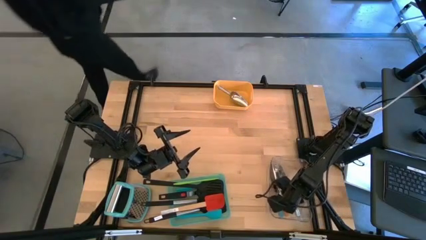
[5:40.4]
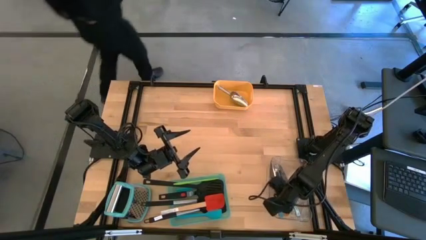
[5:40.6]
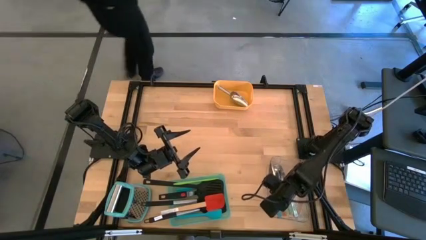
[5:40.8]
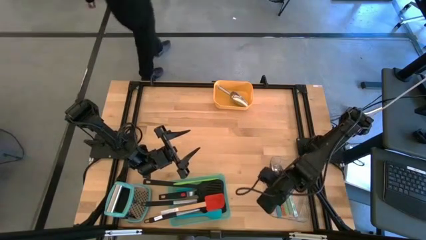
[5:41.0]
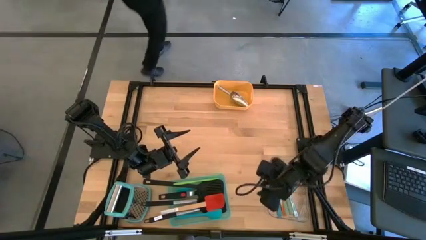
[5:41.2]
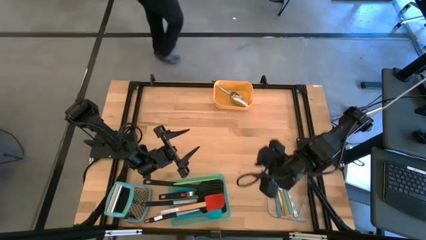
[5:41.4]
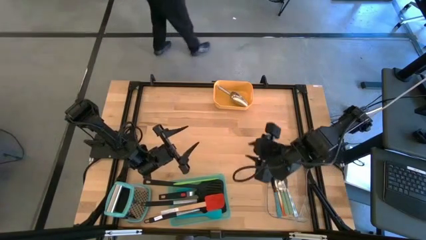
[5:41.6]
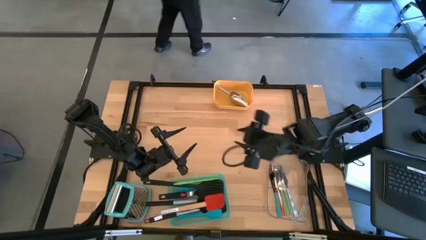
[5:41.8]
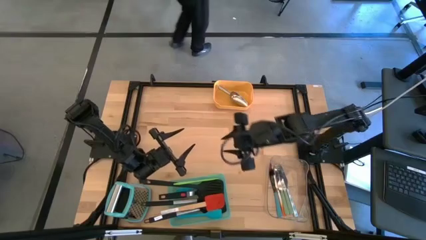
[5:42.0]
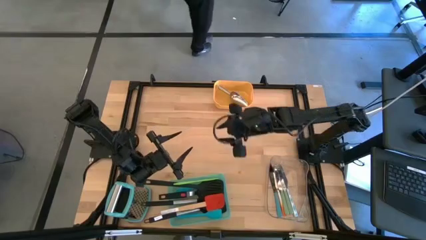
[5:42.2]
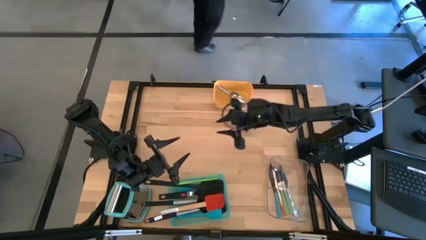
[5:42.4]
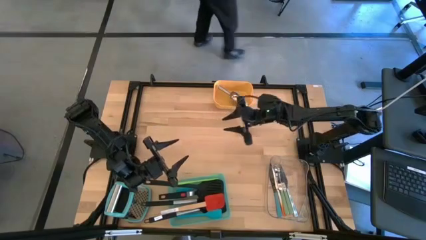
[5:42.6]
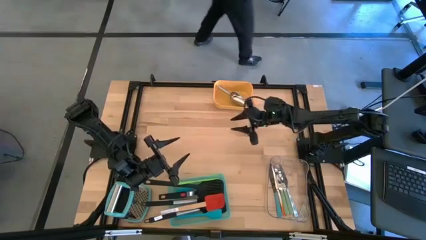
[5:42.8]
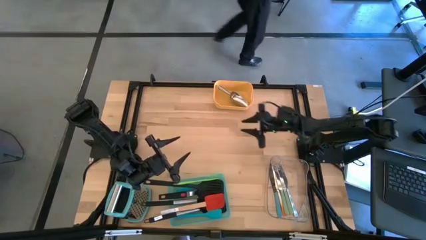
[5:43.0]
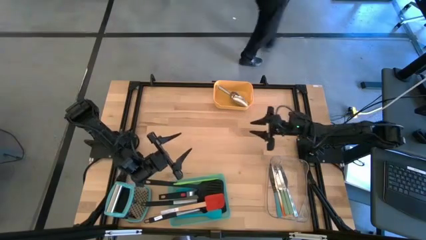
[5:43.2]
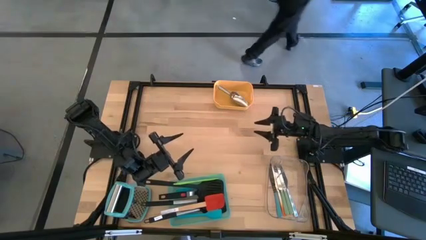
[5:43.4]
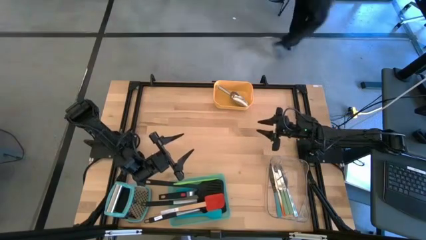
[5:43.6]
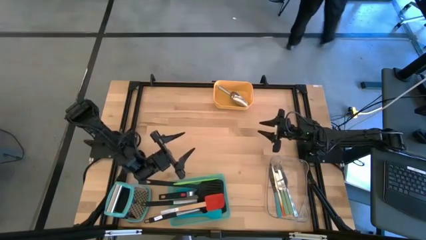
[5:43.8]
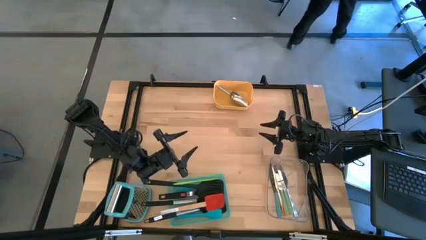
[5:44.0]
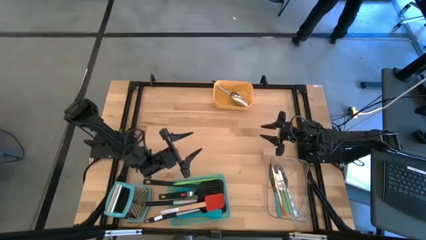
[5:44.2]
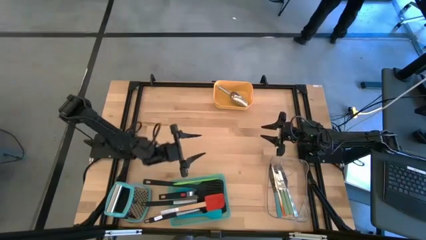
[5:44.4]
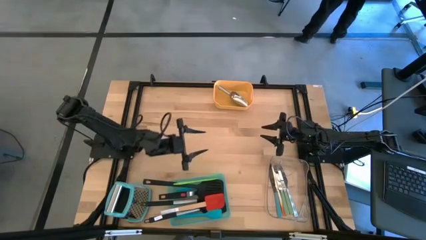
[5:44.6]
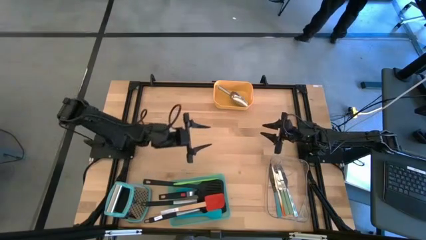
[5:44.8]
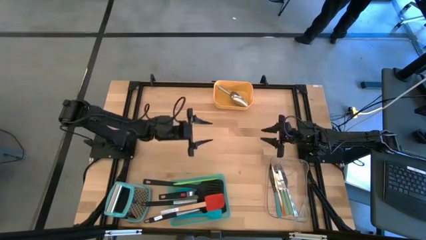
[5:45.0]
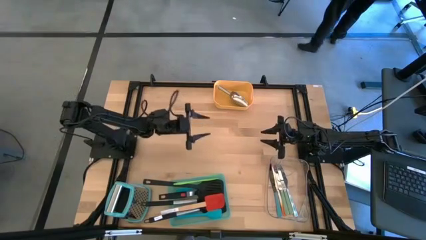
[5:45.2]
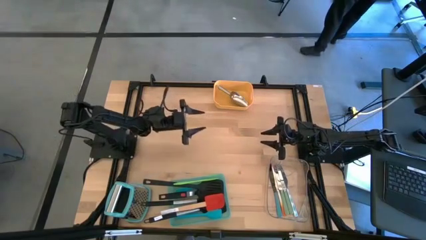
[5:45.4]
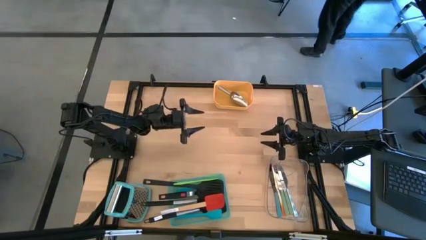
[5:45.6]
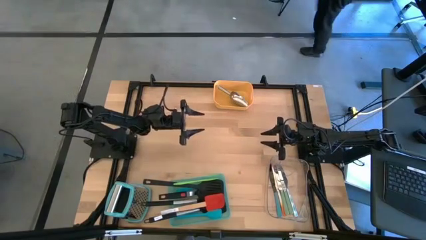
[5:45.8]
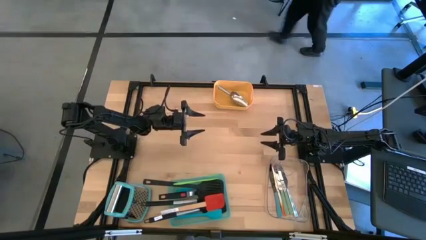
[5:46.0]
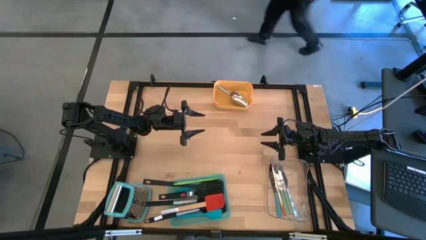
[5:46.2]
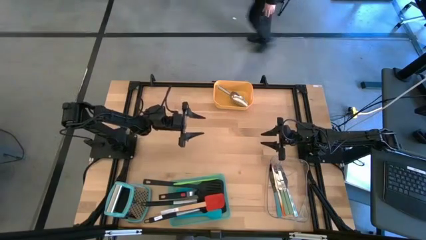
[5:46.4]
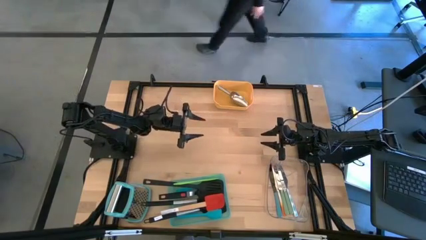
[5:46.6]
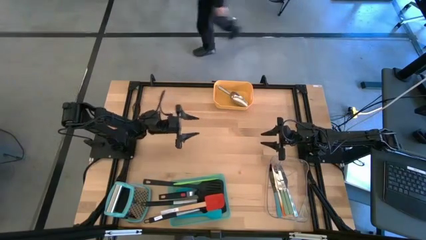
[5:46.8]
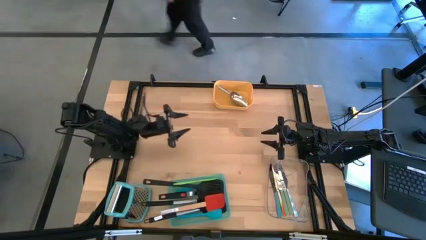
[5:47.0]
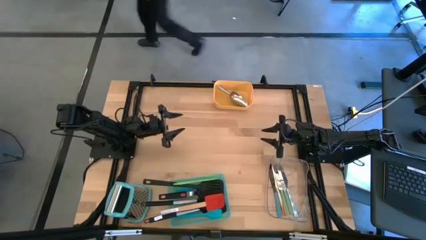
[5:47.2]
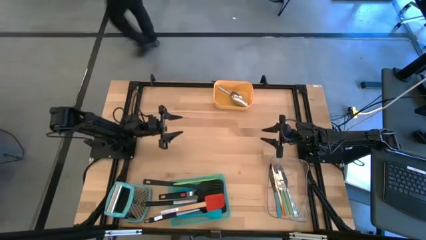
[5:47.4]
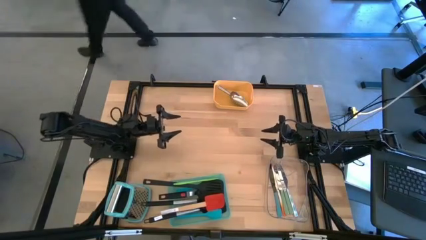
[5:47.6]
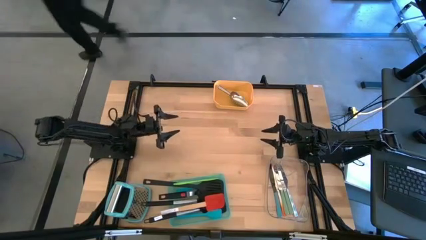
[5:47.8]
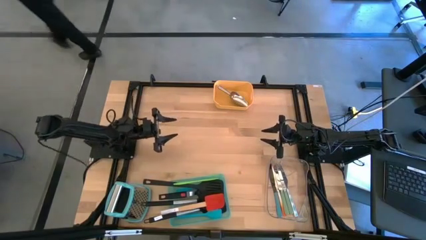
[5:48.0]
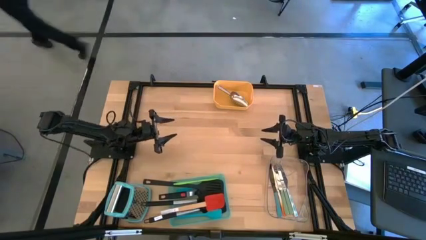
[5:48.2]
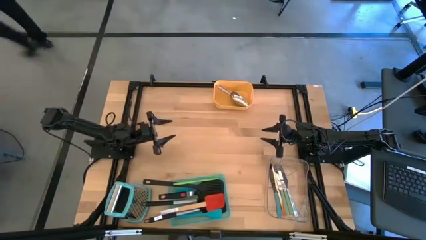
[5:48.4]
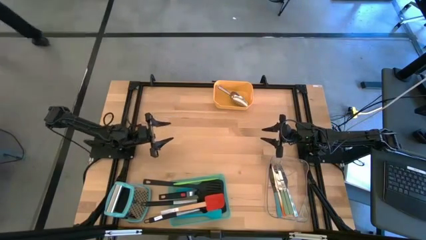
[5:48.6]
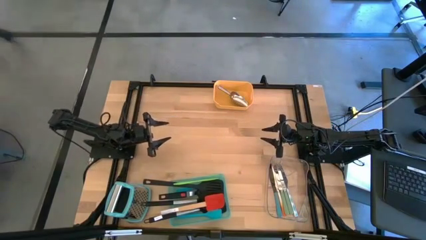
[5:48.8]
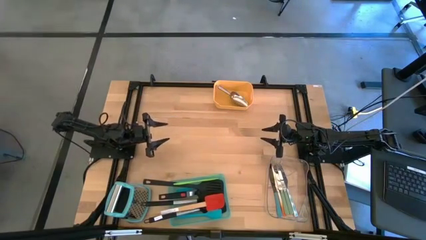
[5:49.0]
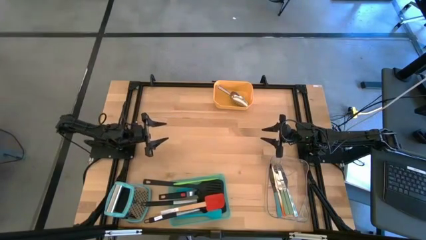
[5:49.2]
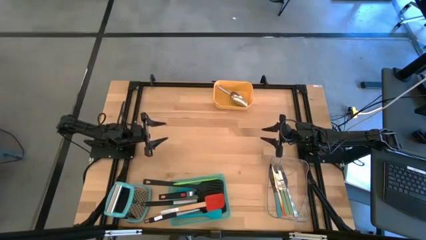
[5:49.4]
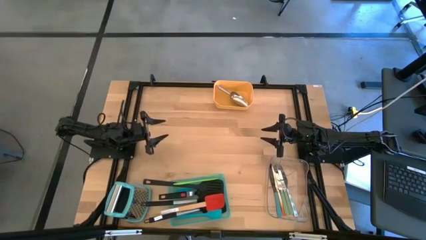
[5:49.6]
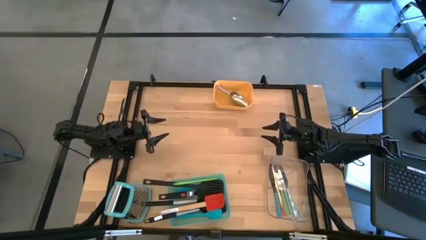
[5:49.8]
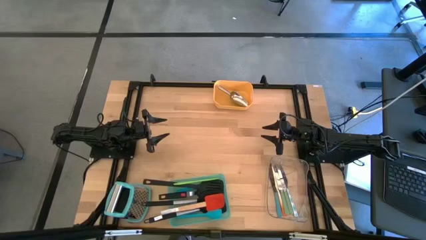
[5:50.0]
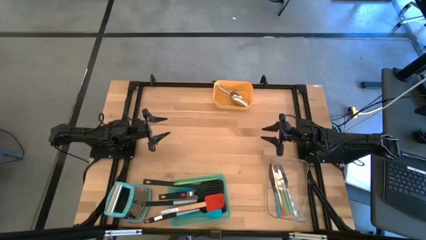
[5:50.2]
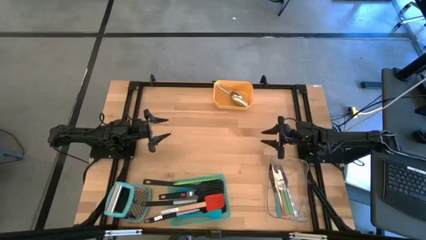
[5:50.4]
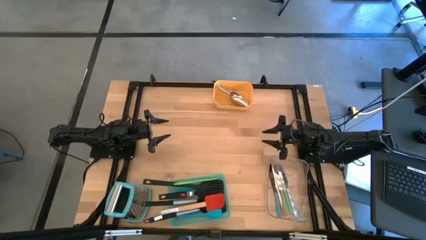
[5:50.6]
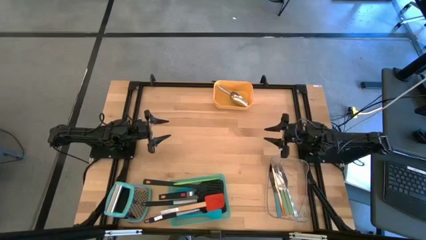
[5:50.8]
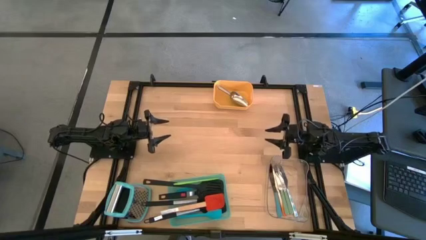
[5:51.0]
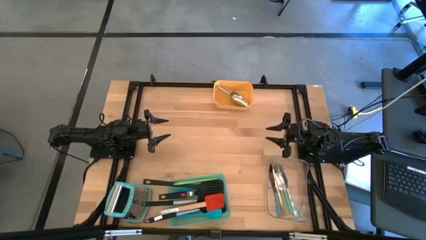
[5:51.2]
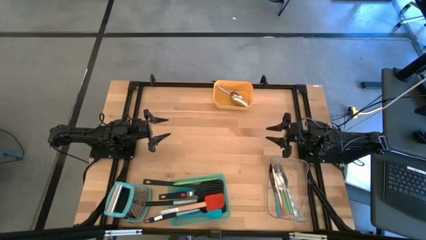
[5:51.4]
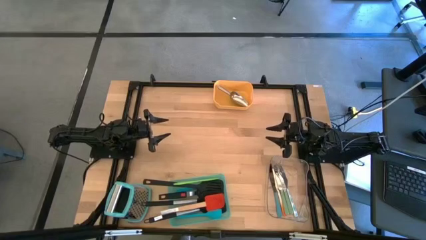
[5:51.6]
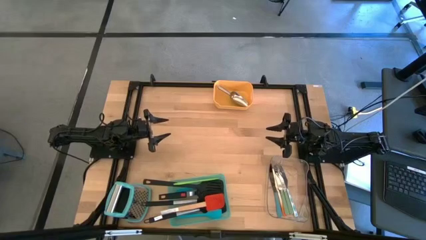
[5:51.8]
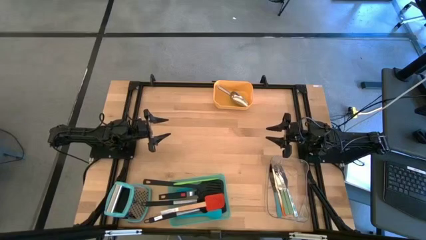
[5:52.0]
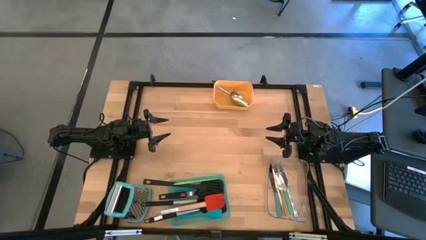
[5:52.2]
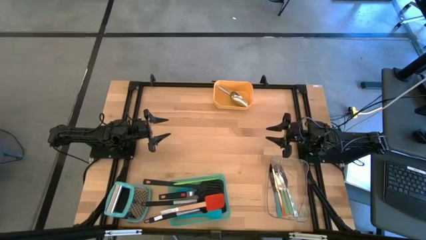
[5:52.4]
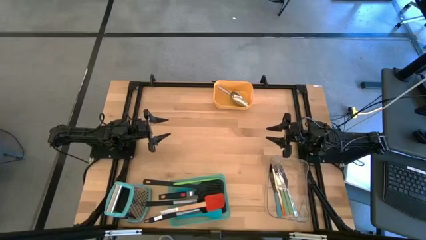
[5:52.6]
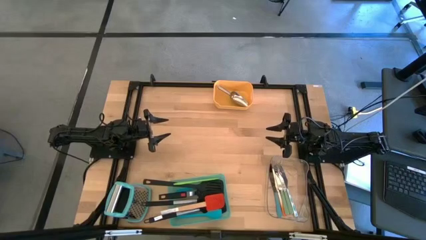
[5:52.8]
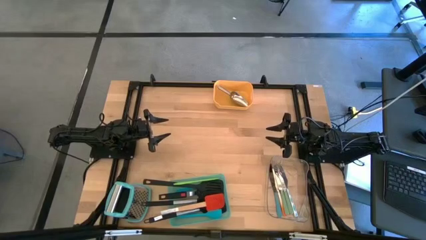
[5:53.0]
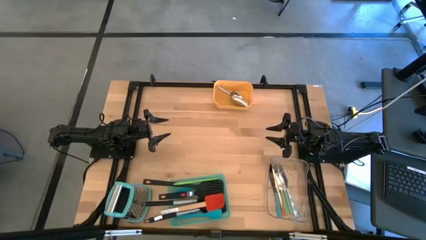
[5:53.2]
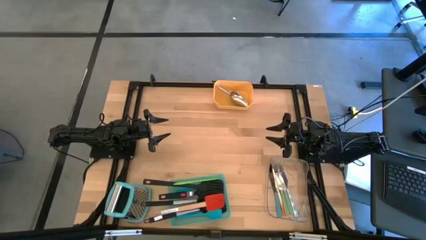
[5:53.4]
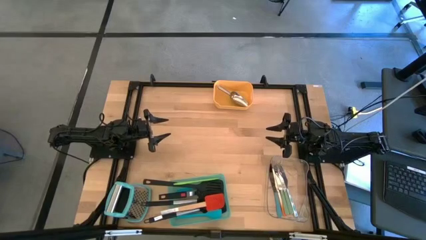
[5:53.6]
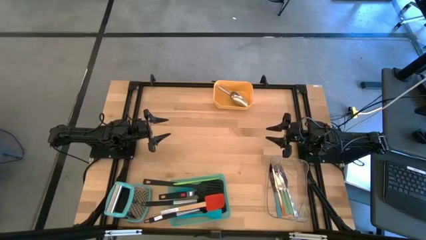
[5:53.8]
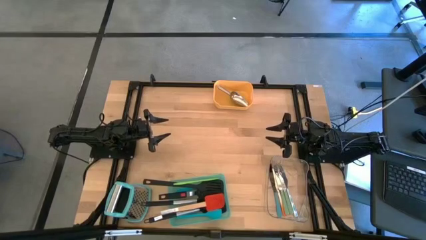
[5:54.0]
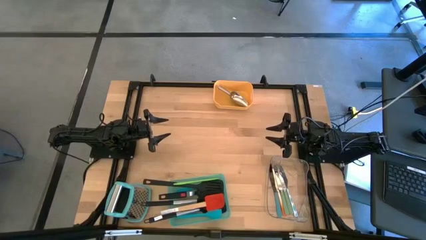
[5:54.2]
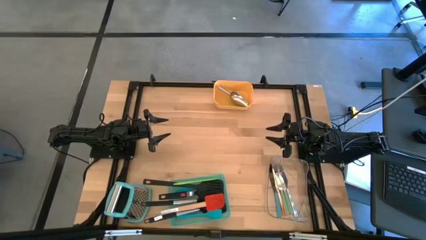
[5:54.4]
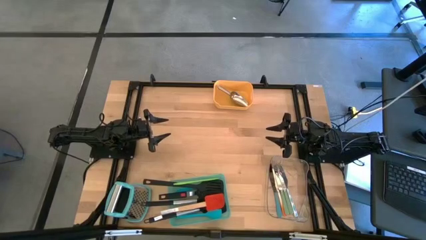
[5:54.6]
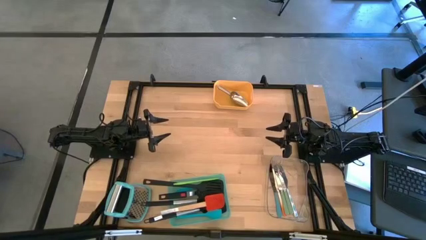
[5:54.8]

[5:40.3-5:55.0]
Task: Pick & Place Kitchen Items
Return to Home Position
